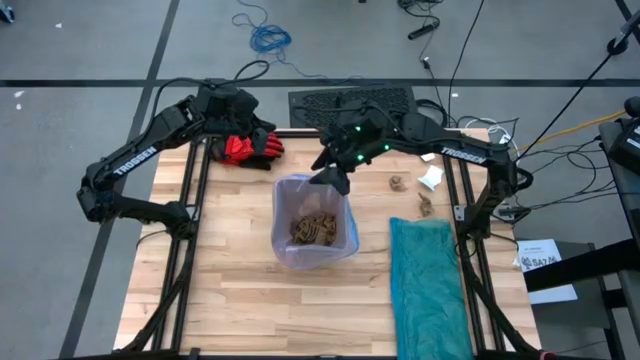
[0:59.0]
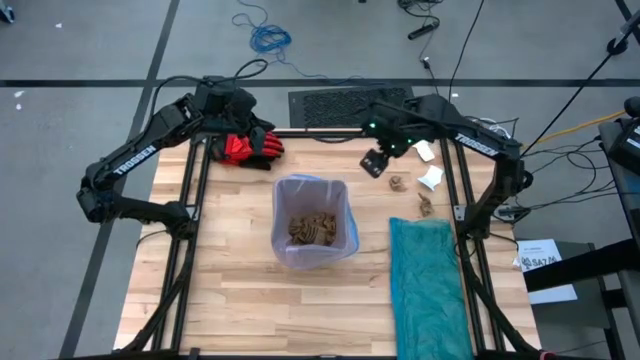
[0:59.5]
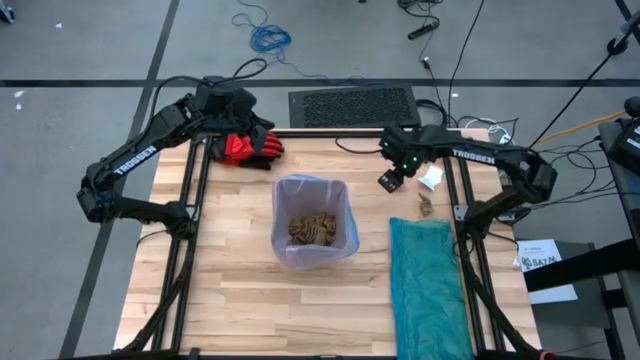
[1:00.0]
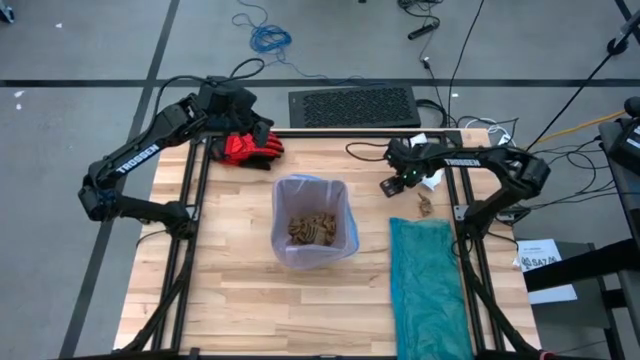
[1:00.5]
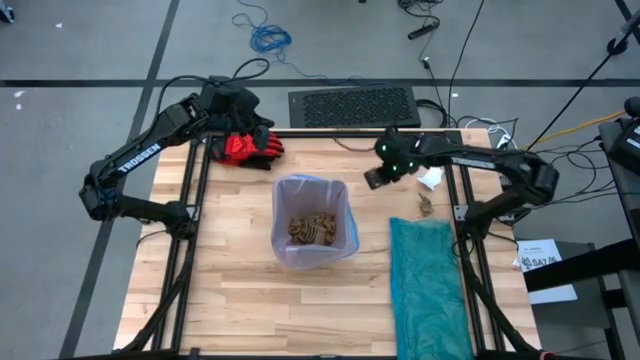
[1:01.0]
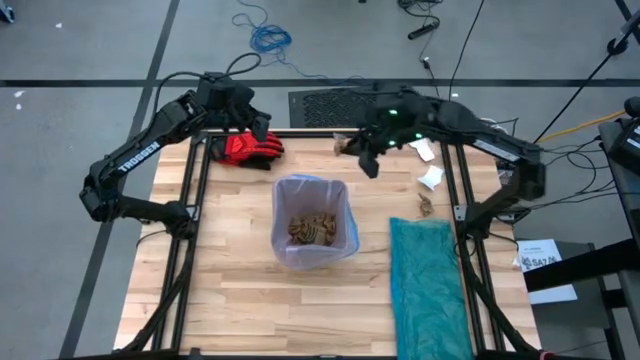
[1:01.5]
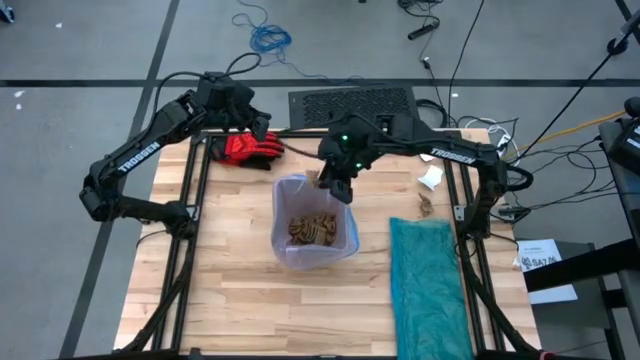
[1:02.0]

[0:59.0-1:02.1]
Task: place trash/remove bag and relplace
Put the brown napkin into the trash bin

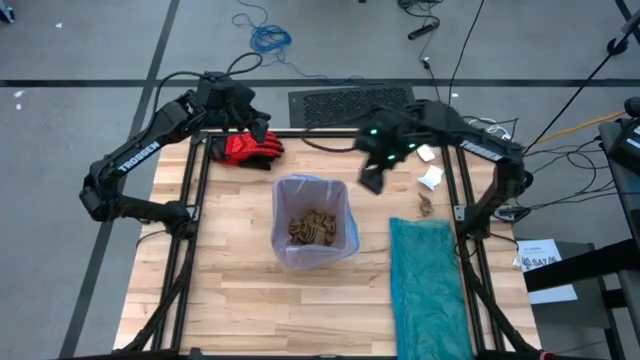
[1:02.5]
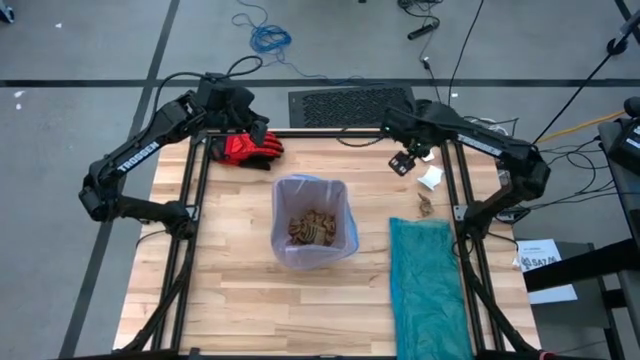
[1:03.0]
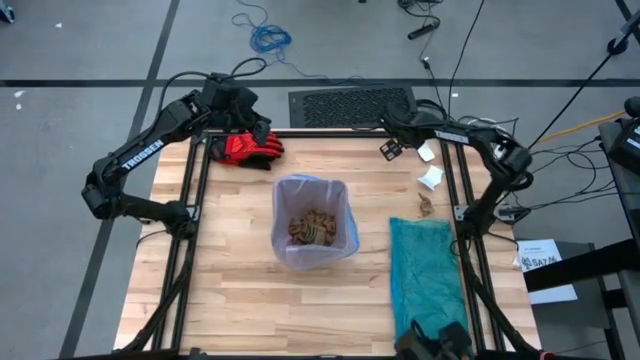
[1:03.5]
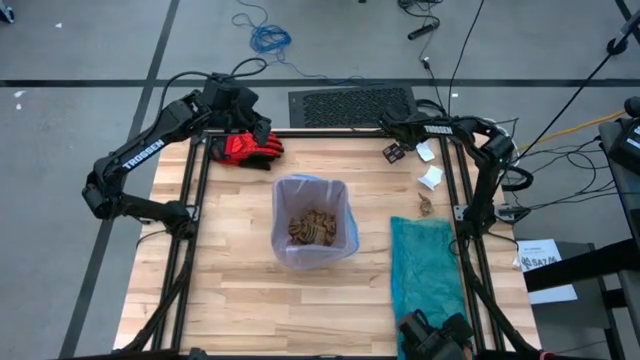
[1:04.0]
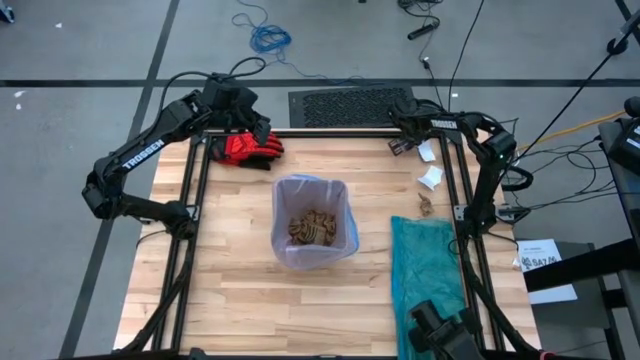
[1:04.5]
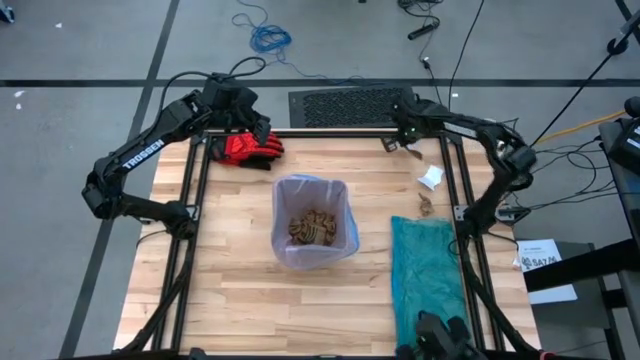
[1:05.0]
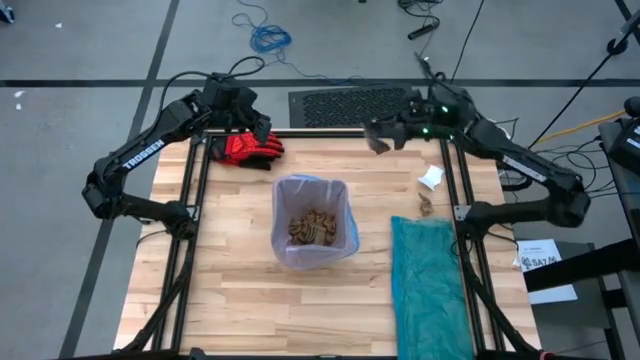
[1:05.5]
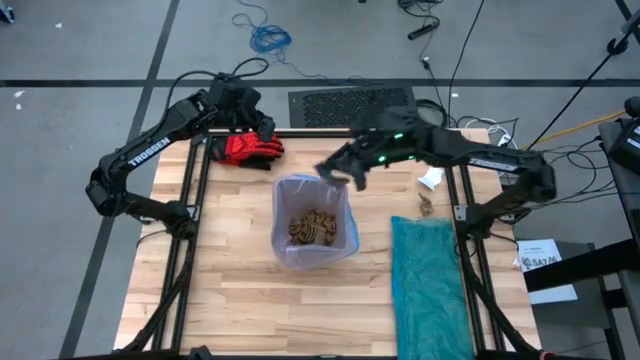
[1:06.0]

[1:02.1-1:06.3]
Put the white paper into the trash bin

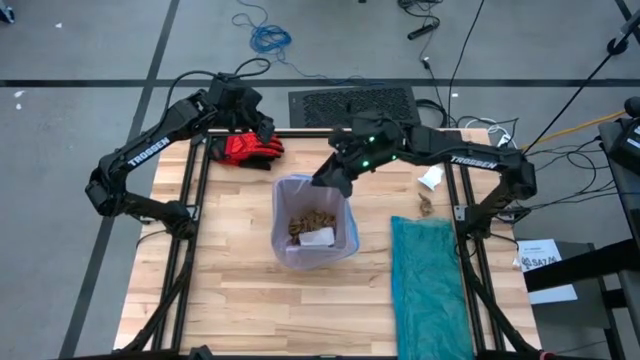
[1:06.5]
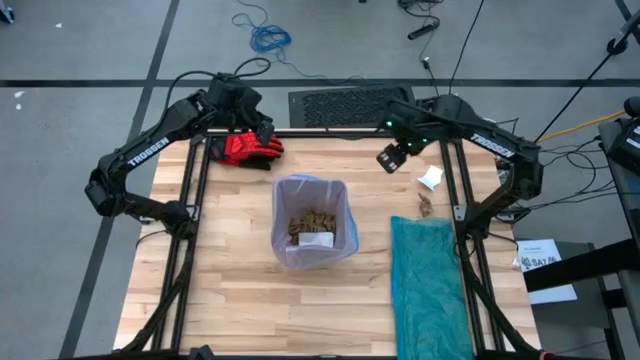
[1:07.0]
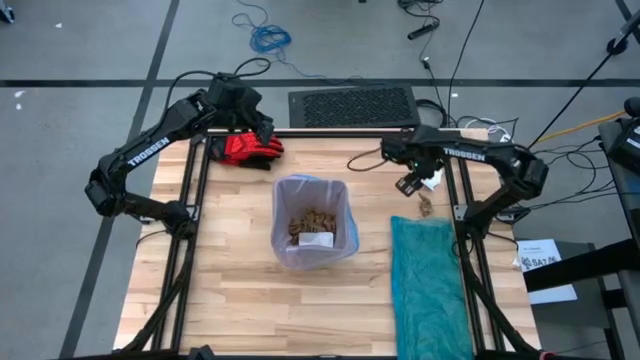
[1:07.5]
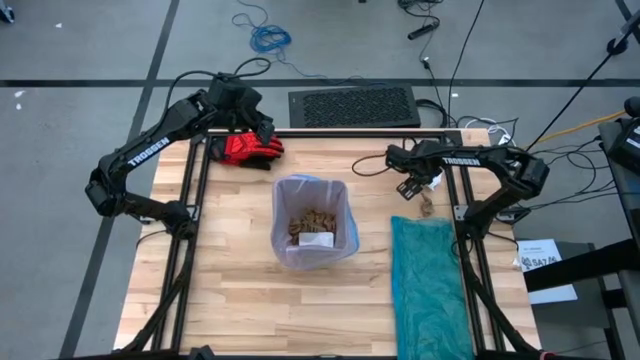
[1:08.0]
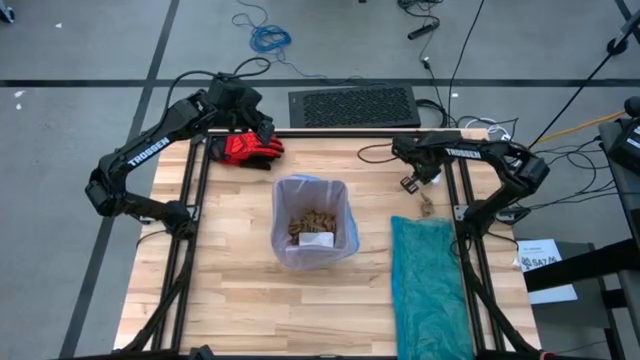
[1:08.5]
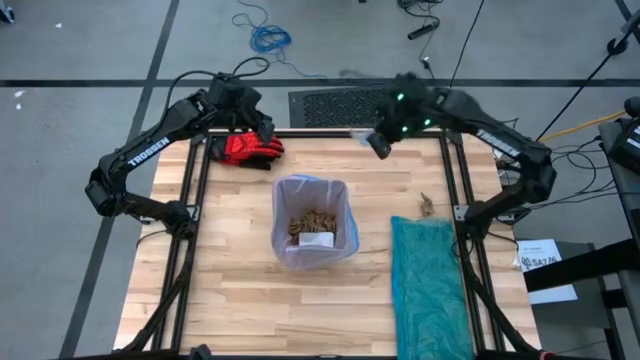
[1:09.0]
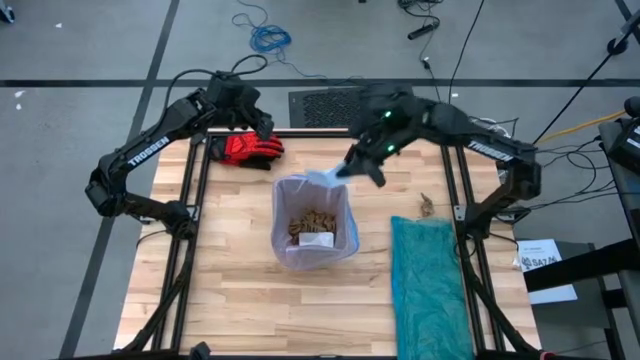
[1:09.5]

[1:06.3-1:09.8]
Put the white paper into the trash bin

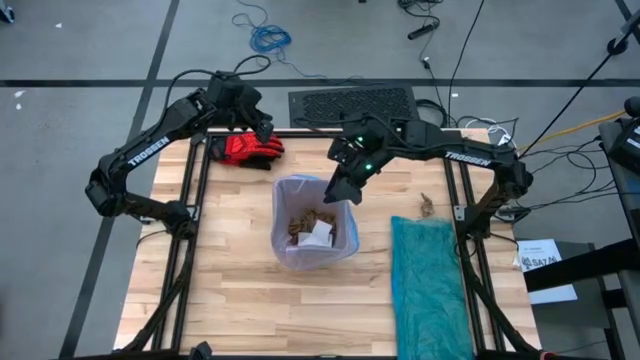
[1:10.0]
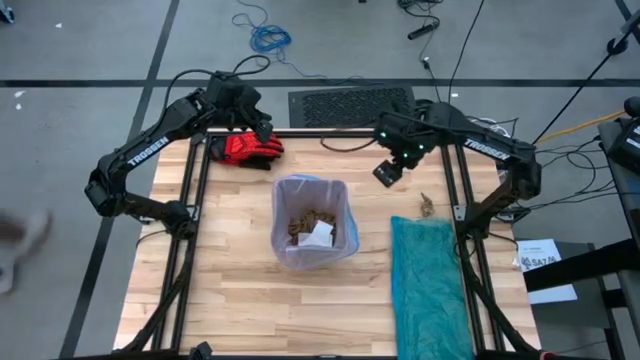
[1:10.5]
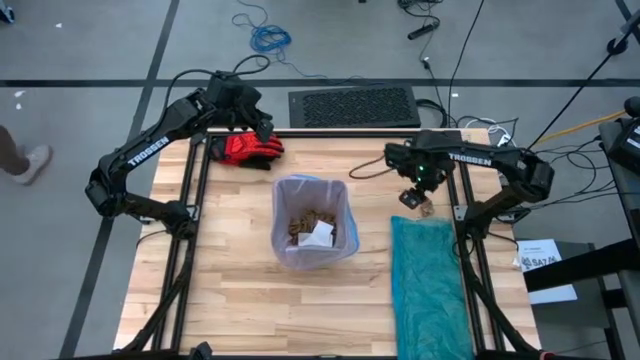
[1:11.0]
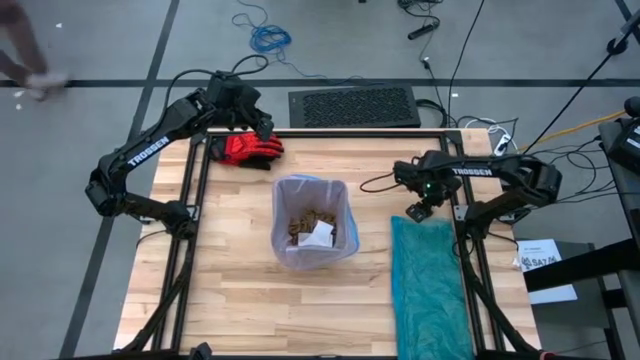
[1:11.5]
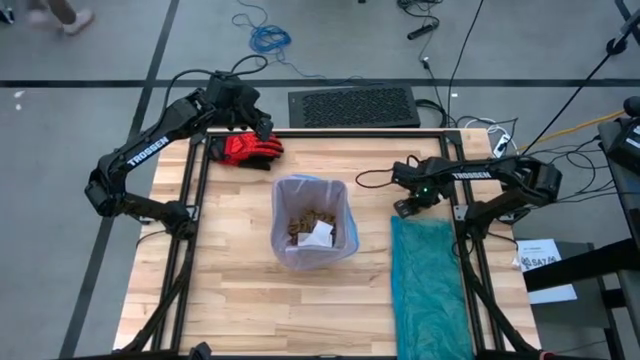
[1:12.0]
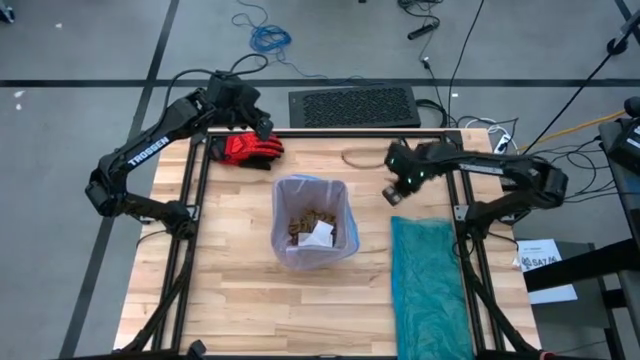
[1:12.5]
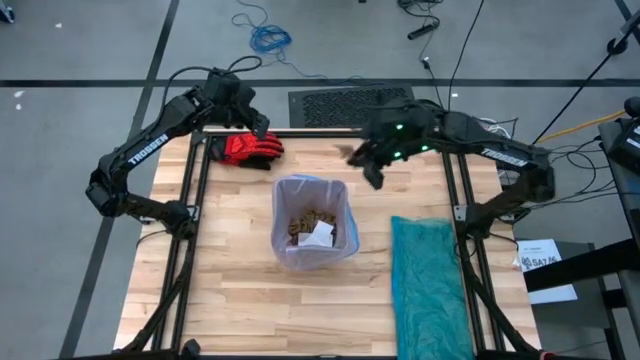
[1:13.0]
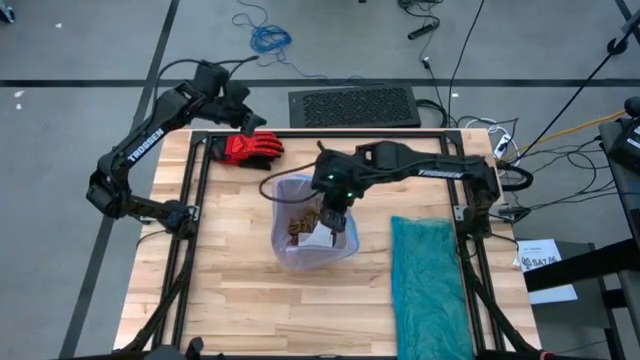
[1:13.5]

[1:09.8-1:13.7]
Put the brown napkin into the trash bin

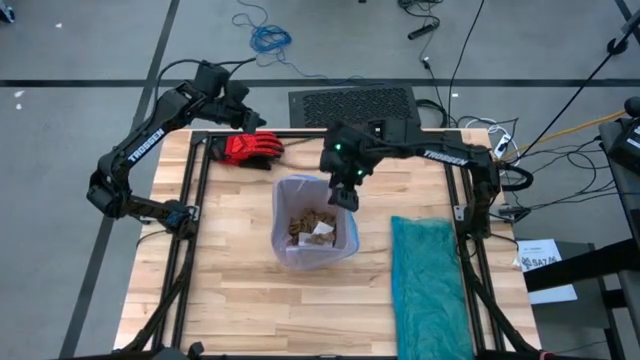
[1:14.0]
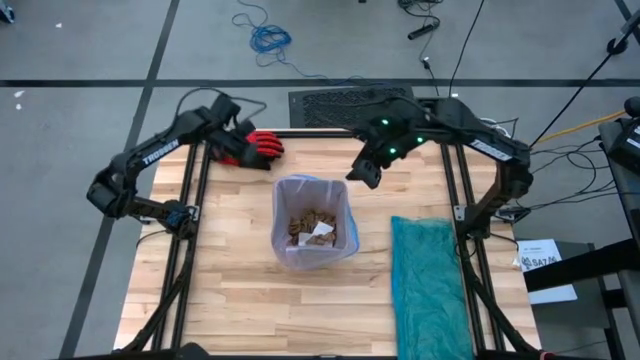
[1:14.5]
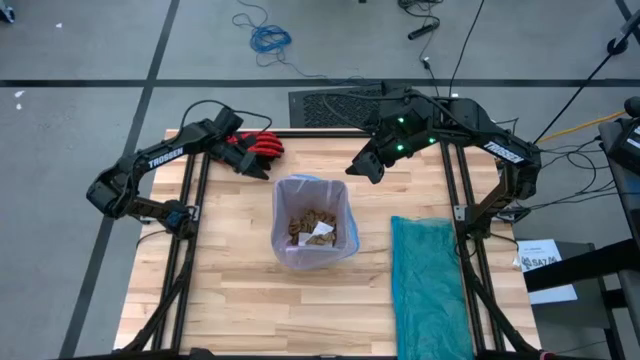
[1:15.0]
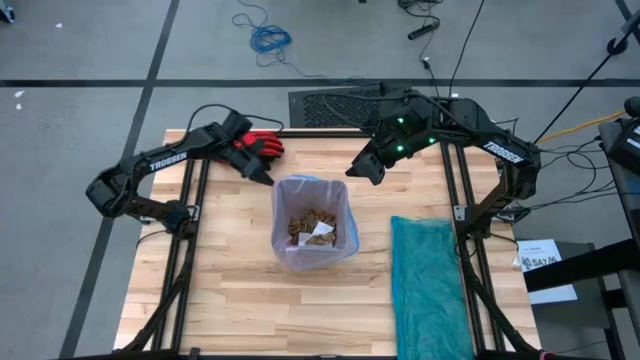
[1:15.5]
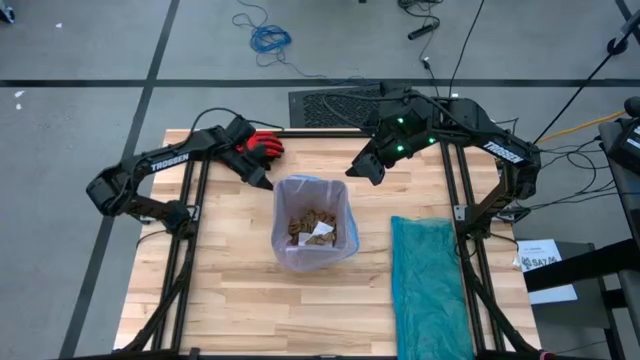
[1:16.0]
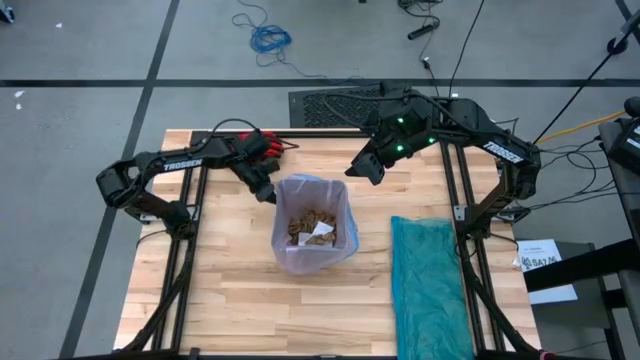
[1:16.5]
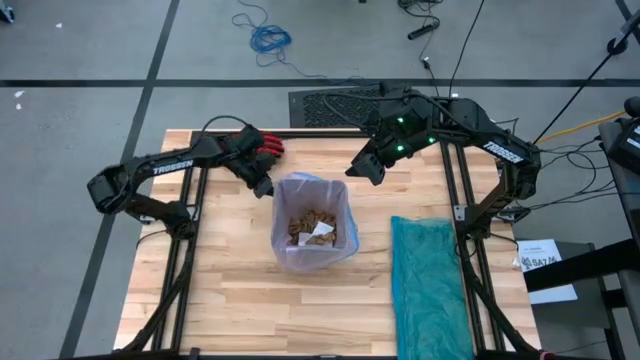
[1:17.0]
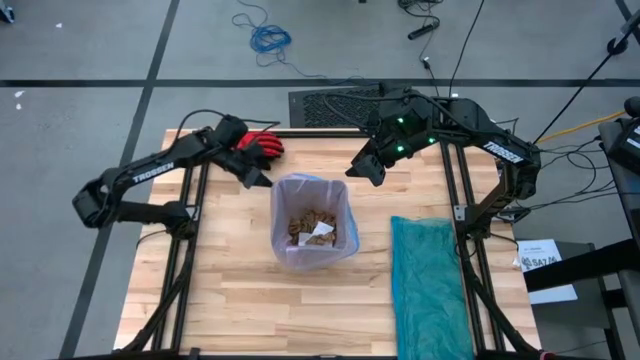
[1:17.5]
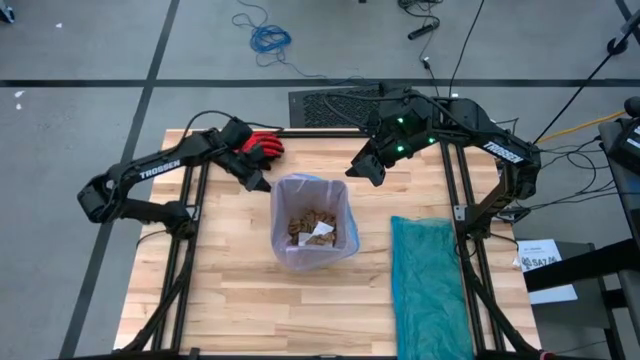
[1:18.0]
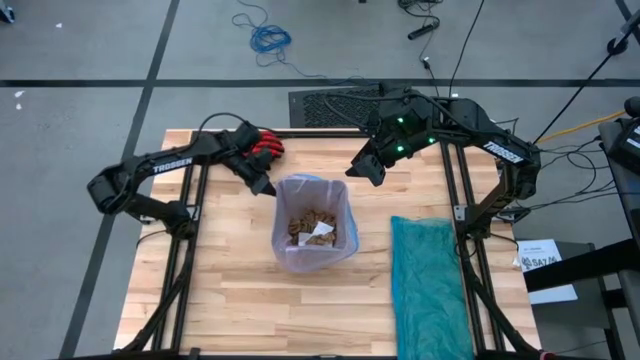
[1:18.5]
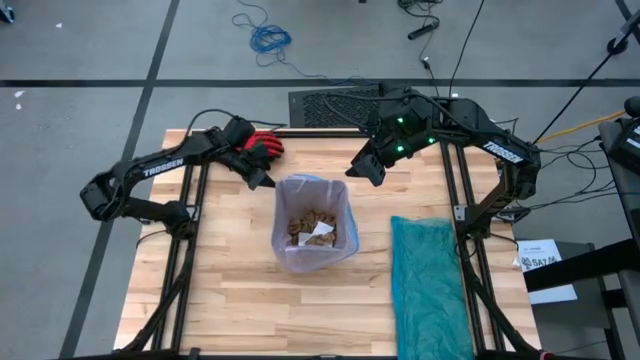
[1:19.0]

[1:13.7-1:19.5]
Close the pink trash bag inside the trash bin

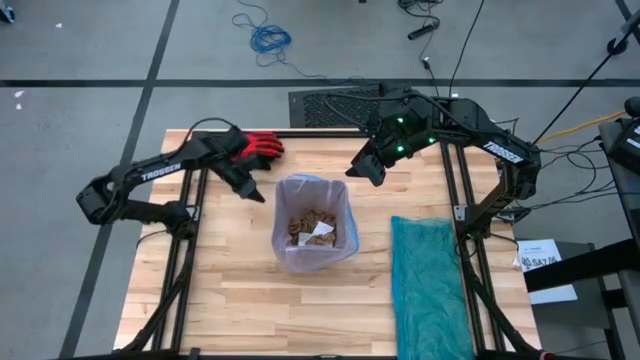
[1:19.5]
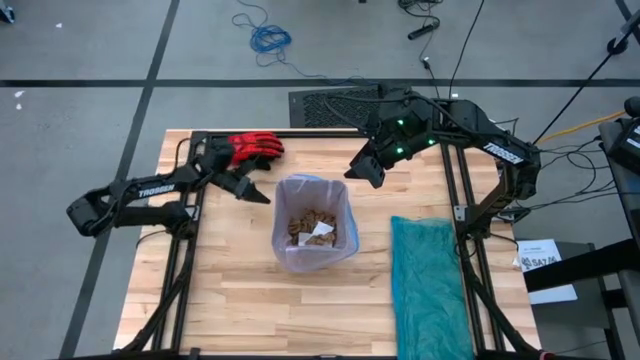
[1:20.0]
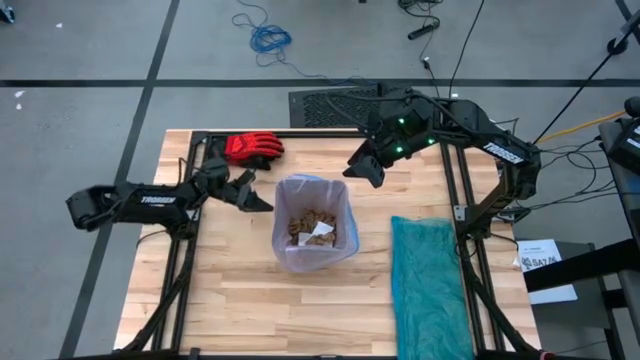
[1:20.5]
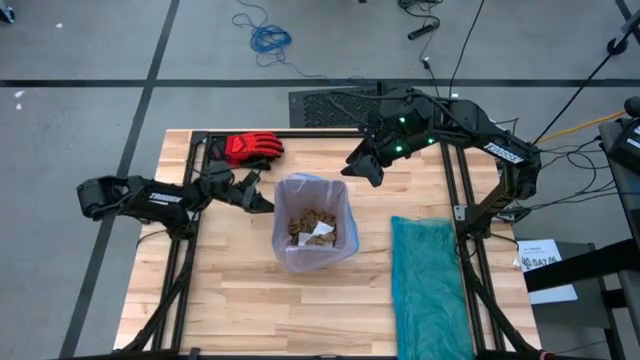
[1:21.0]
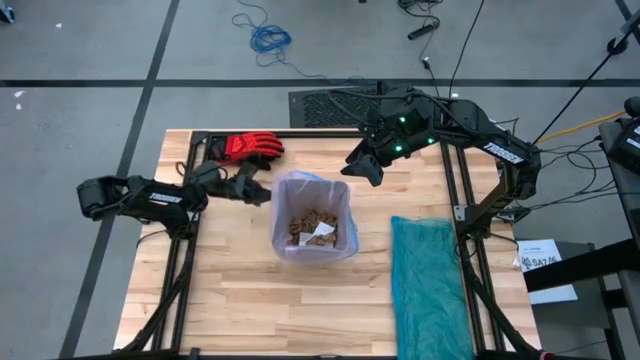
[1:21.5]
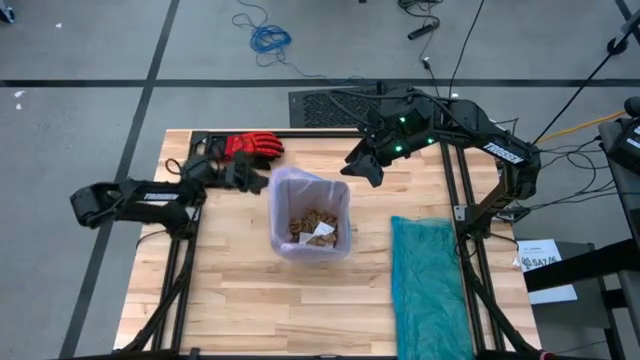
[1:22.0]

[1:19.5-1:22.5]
Close the pink trash bag inside the trash bin
